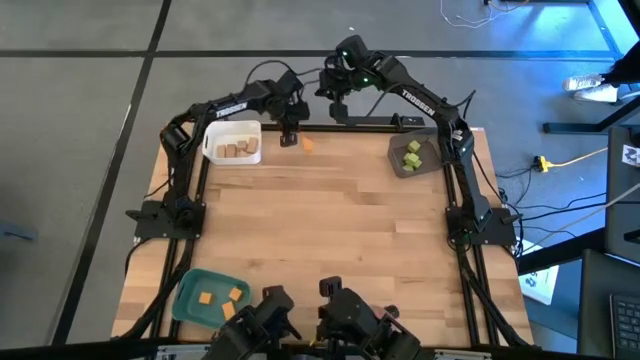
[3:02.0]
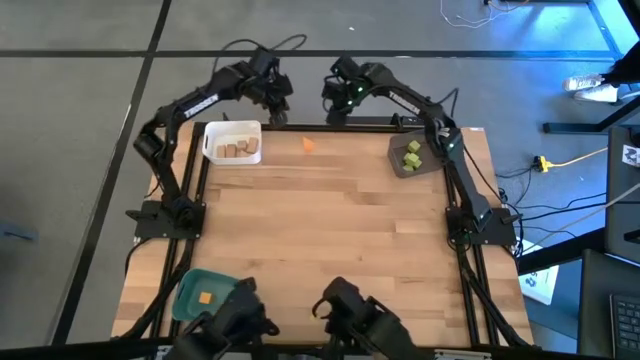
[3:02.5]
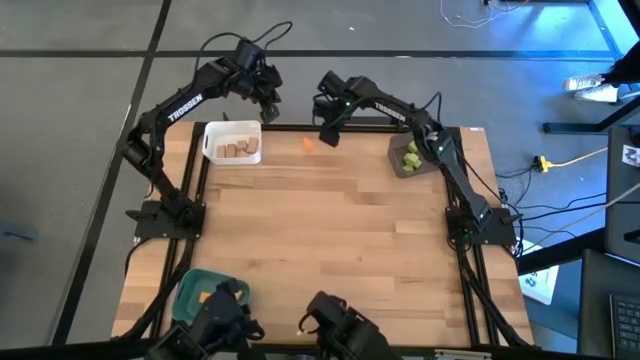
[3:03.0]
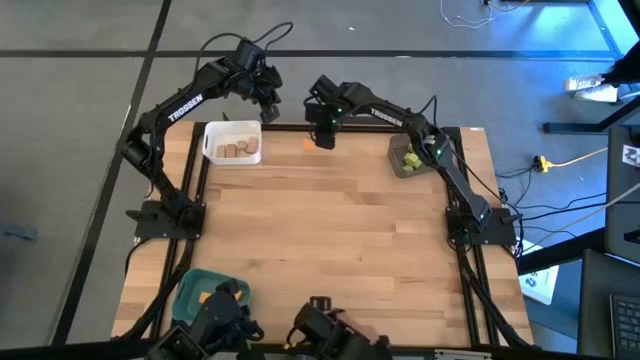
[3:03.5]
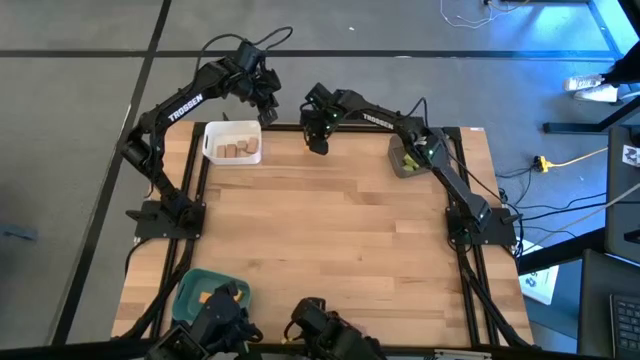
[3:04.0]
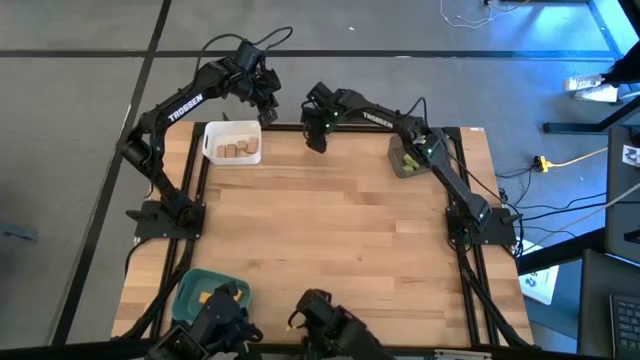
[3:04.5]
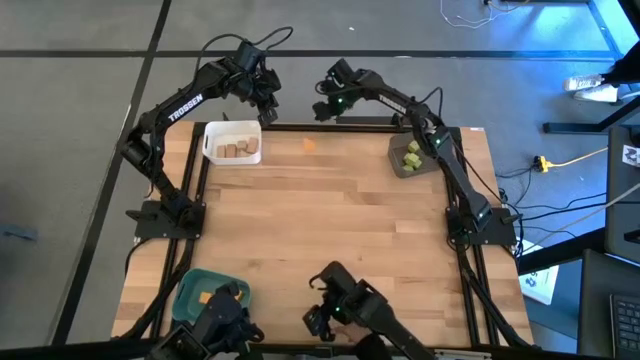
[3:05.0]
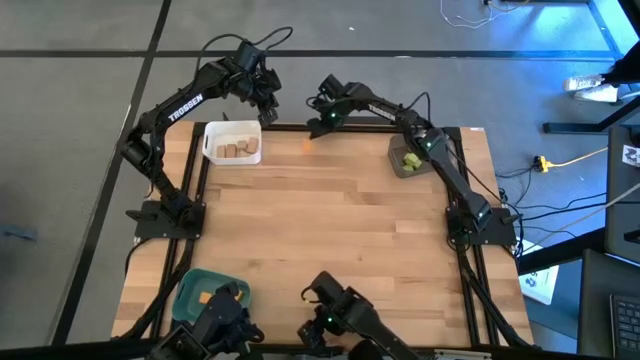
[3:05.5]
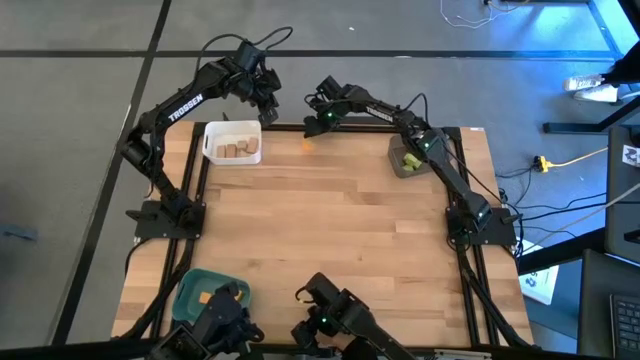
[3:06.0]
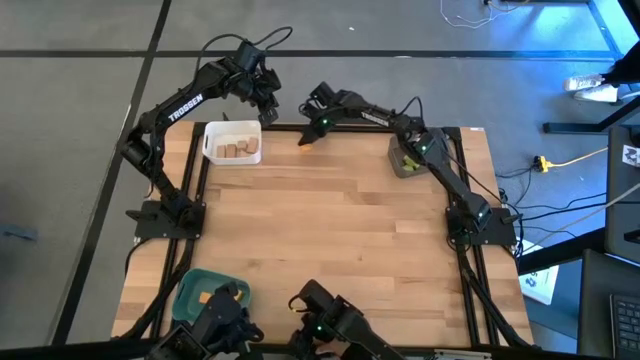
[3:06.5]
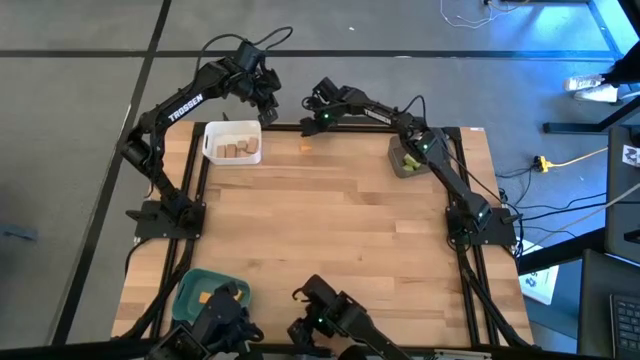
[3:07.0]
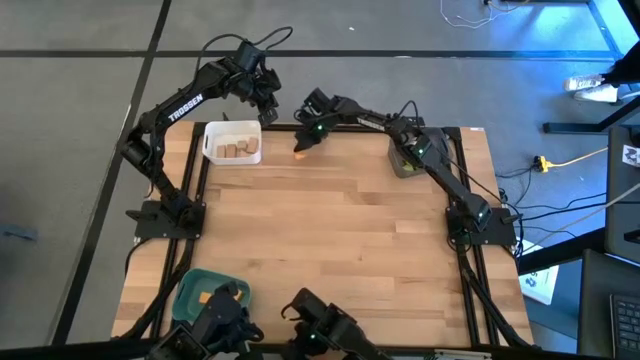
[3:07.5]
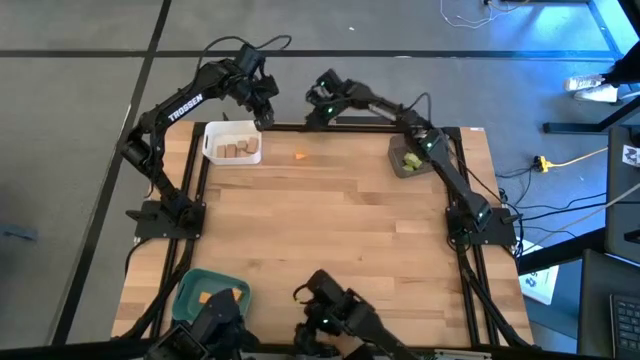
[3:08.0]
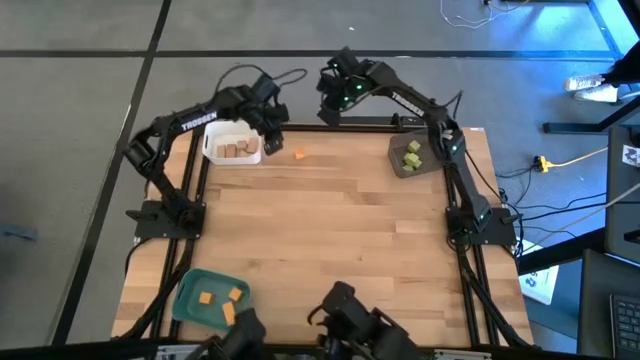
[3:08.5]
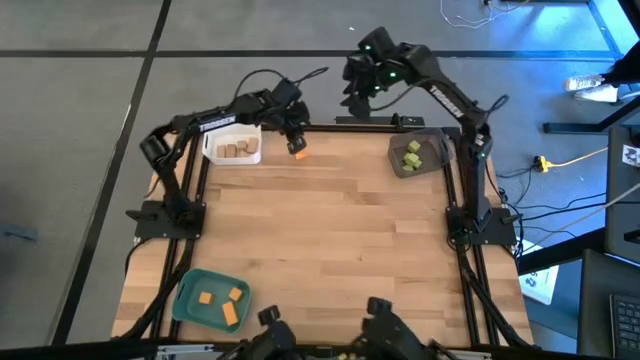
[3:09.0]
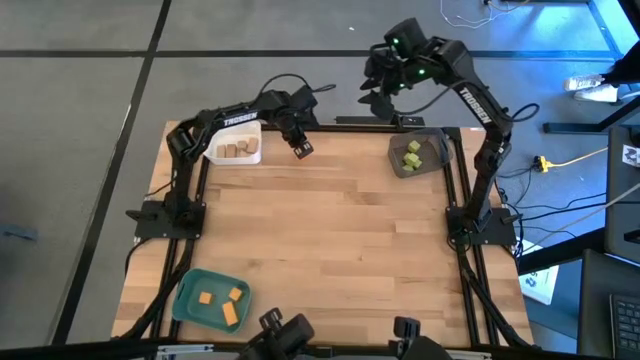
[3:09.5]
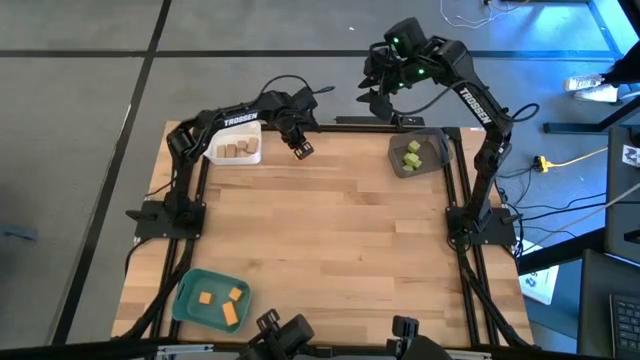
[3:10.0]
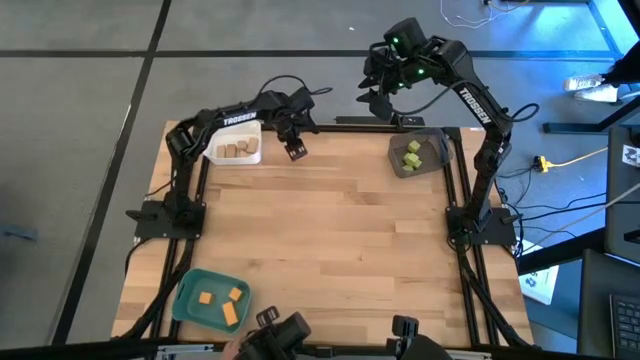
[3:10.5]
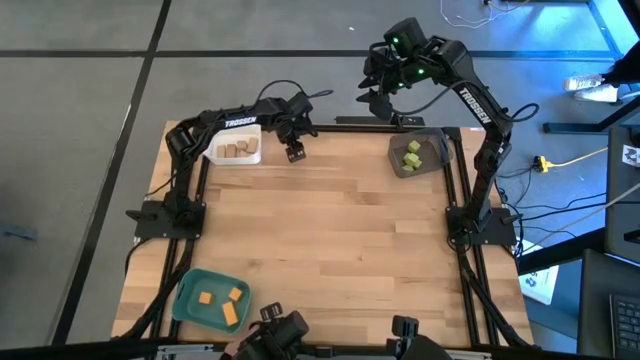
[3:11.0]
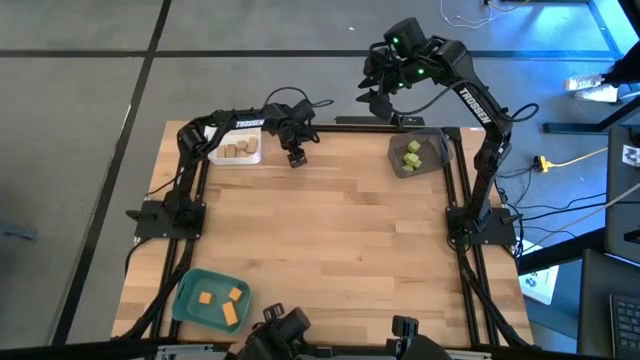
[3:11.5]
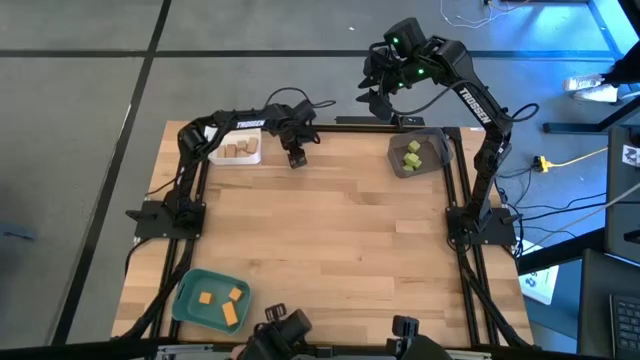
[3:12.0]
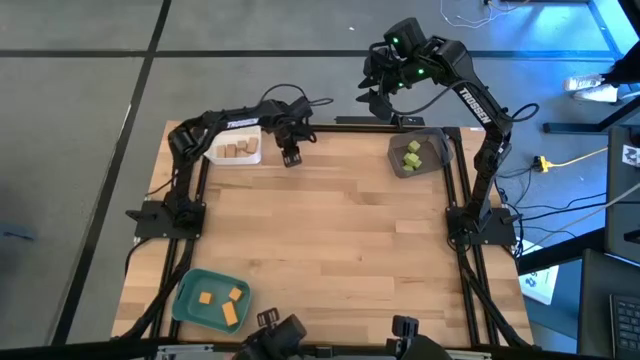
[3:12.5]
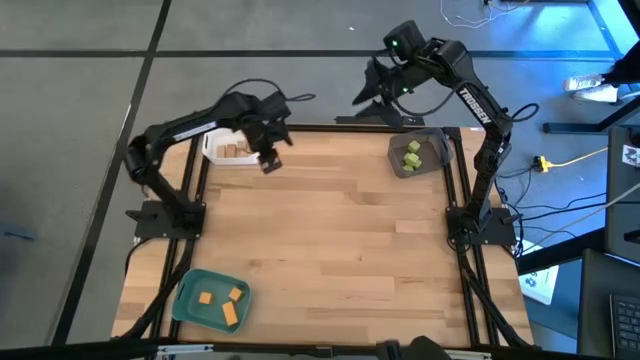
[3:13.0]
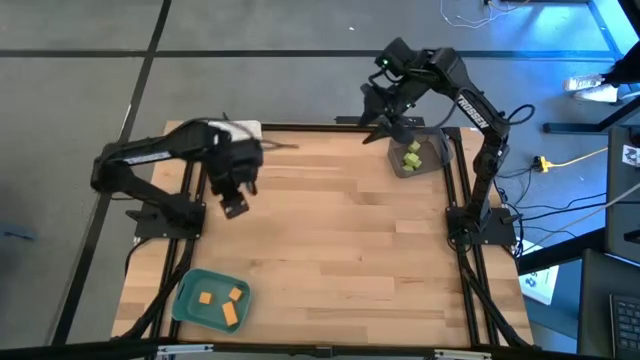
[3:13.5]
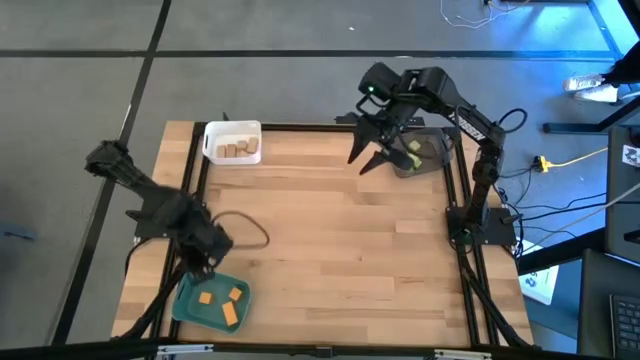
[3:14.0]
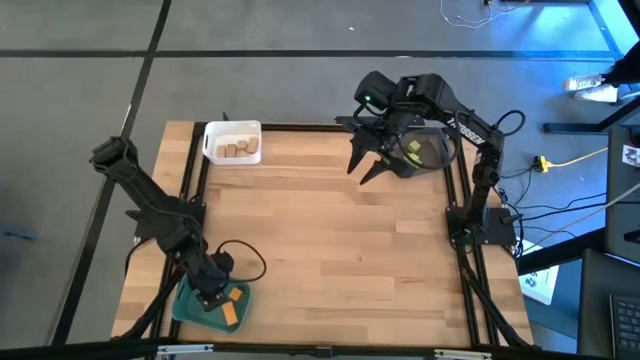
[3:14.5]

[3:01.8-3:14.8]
Task: Sort & place blocks by color
Put the orange block into the green bin

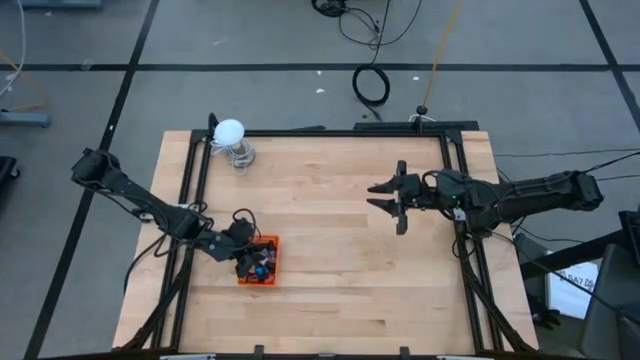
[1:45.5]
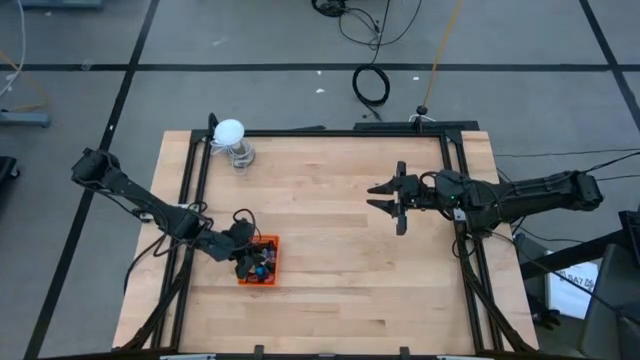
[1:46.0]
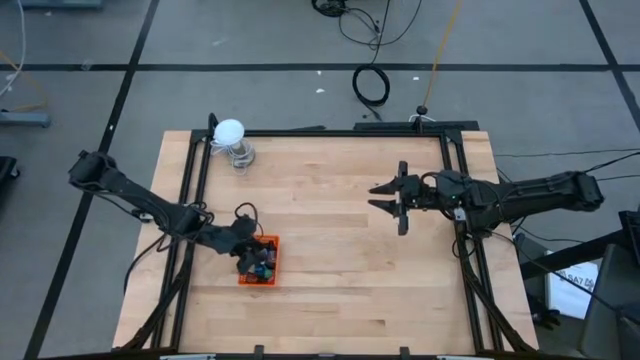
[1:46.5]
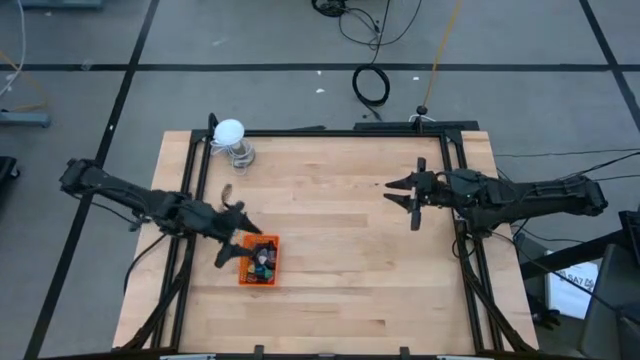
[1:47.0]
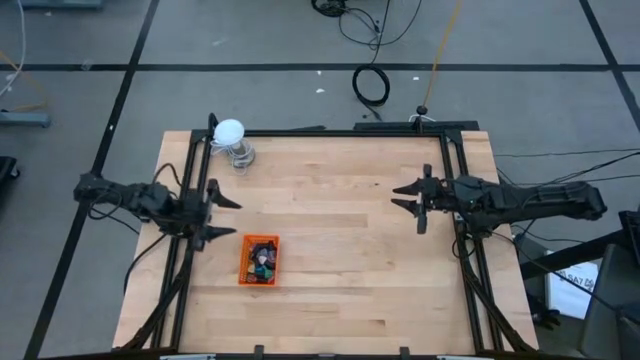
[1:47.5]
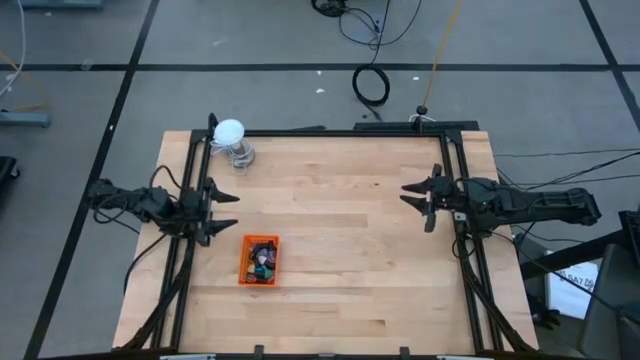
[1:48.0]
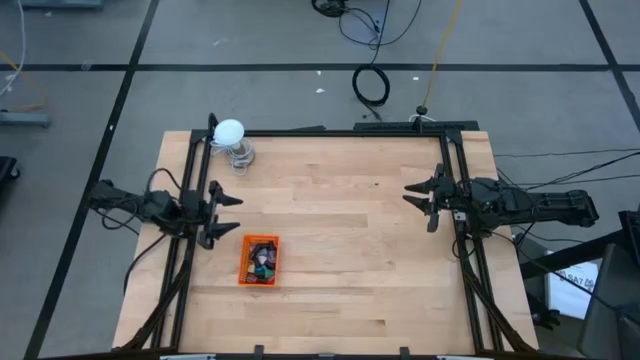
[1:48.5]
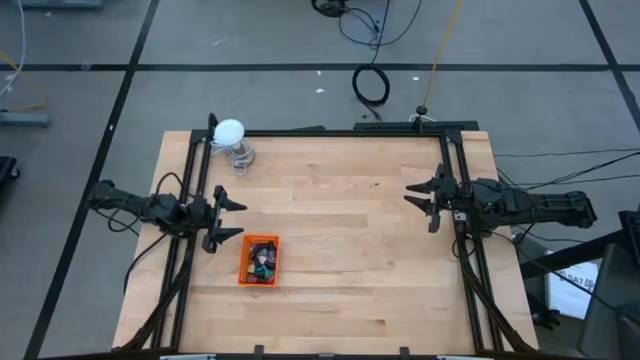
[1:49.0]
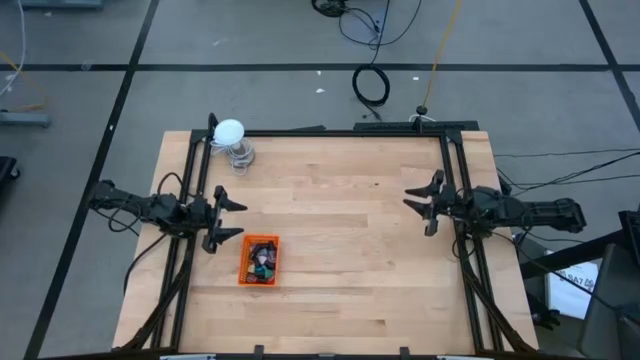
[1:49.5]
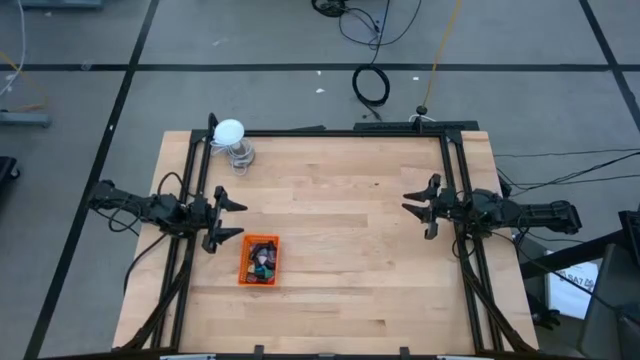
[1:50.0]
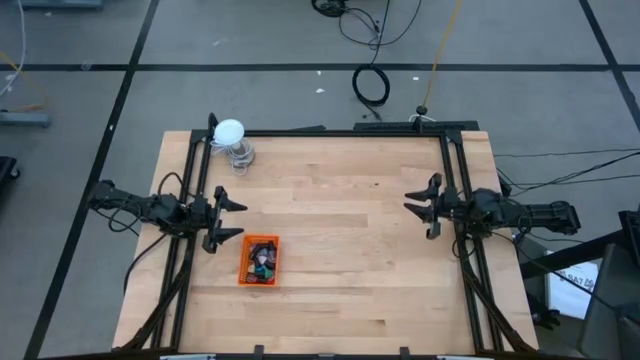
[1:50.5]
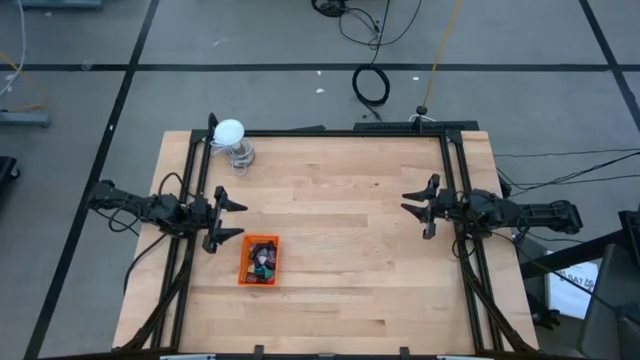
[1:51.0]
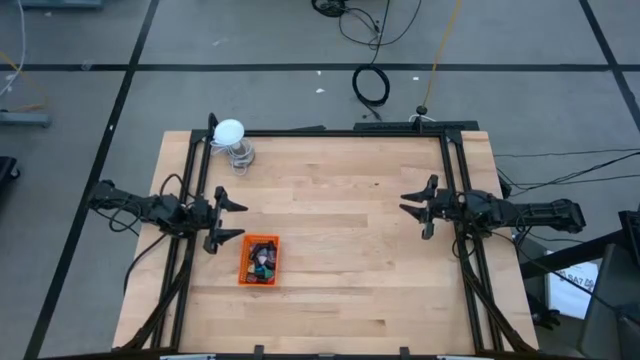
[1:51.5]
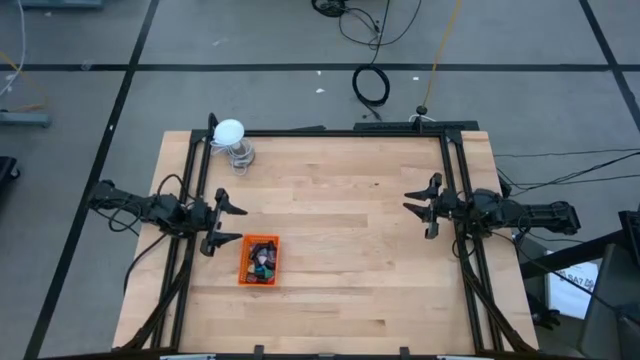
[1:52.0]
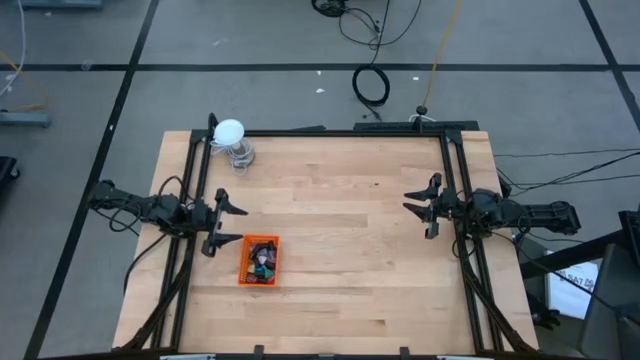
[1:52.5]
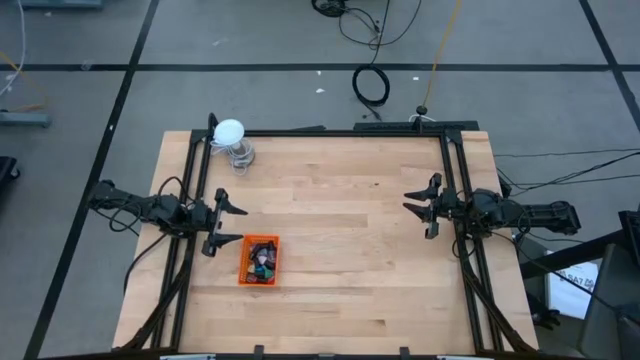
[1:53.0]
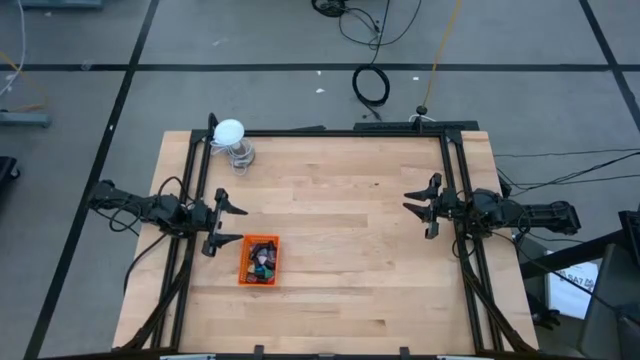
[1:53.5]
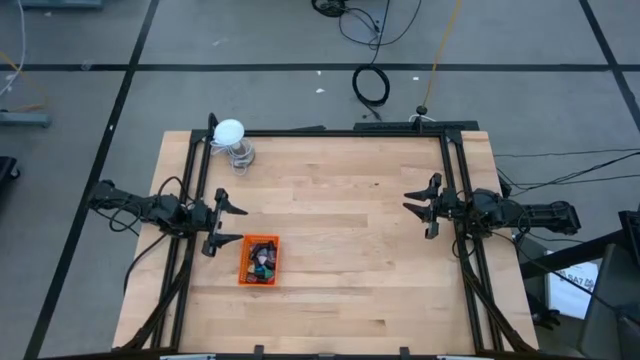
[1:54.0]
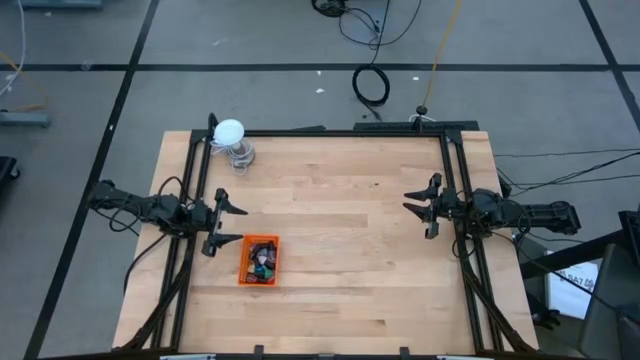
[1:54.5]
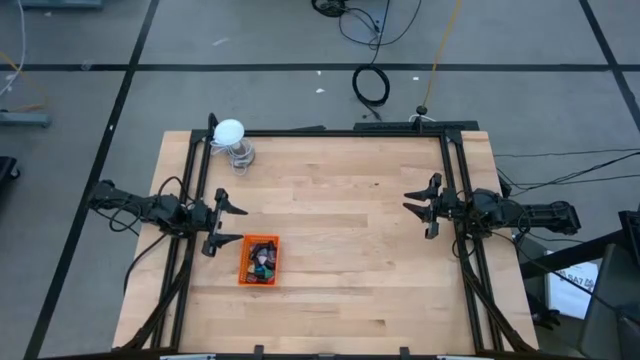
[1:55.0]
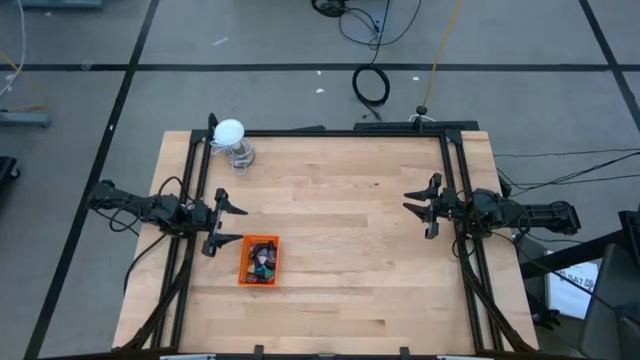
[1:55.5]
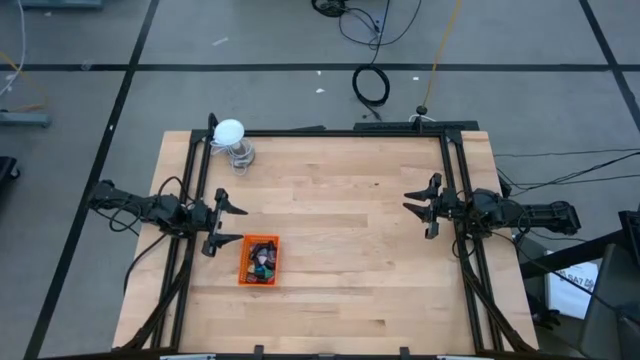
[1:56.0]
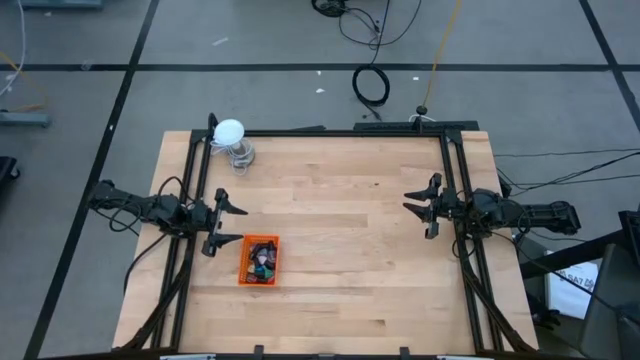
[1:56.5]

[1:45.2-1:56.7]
Task: Pick & Place Nail Polish
Return to Home Position
